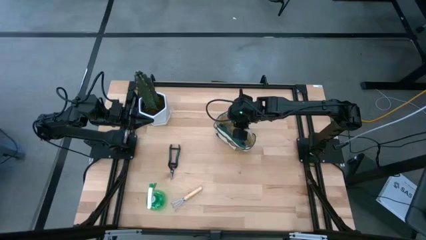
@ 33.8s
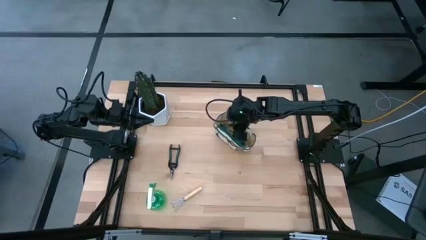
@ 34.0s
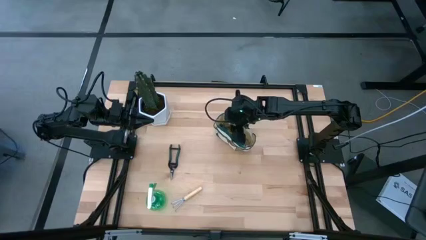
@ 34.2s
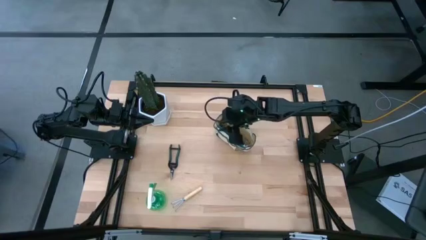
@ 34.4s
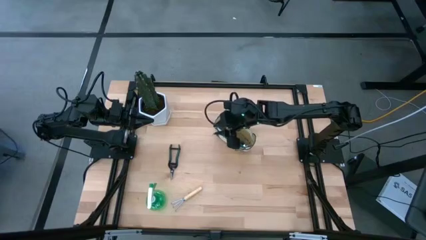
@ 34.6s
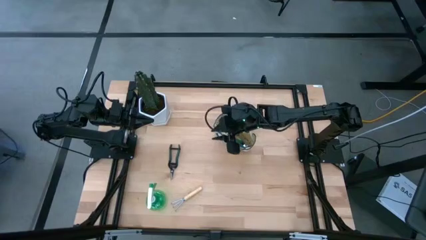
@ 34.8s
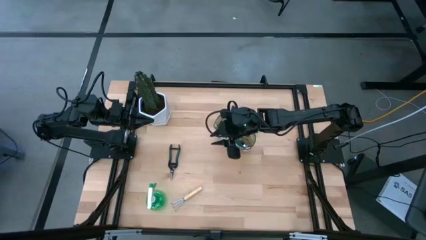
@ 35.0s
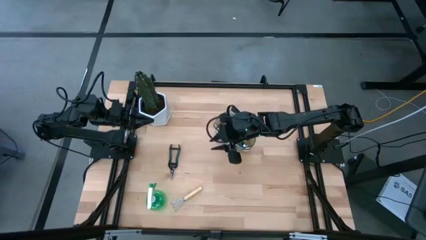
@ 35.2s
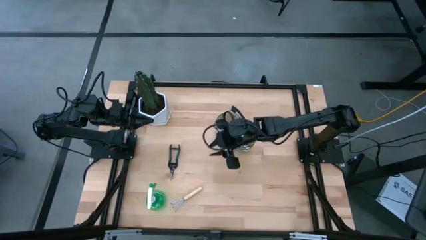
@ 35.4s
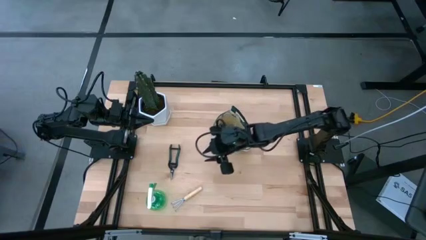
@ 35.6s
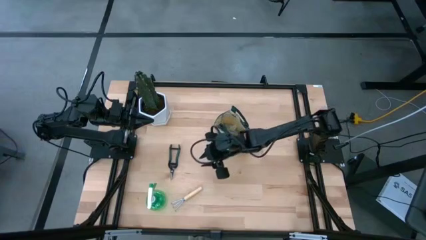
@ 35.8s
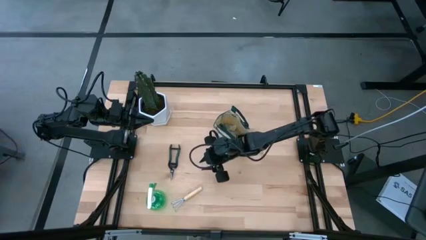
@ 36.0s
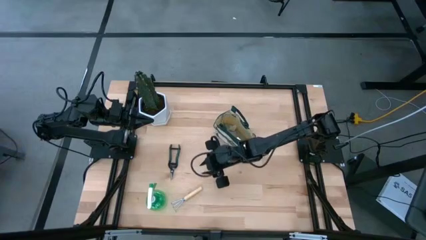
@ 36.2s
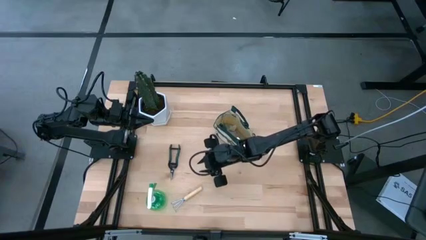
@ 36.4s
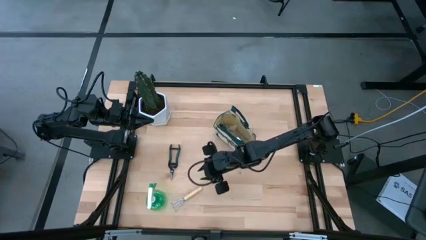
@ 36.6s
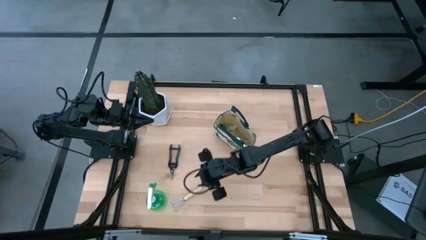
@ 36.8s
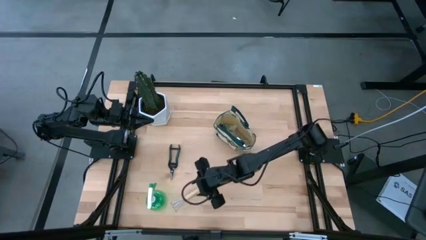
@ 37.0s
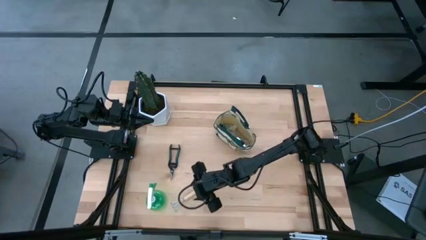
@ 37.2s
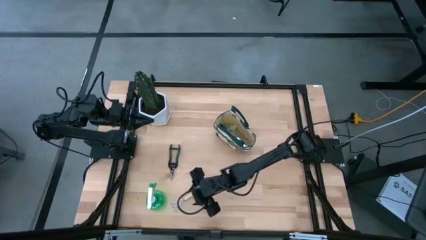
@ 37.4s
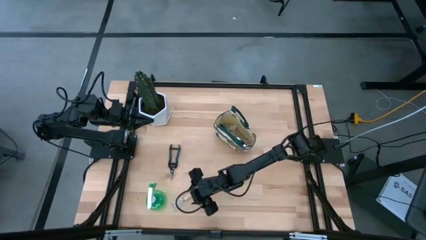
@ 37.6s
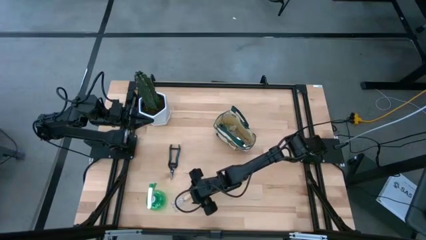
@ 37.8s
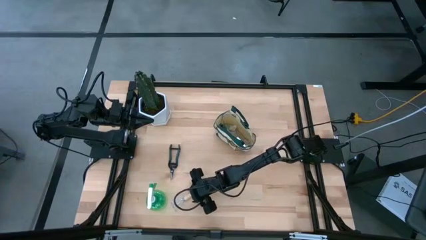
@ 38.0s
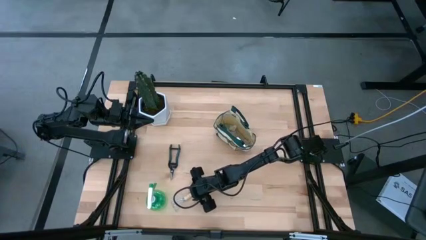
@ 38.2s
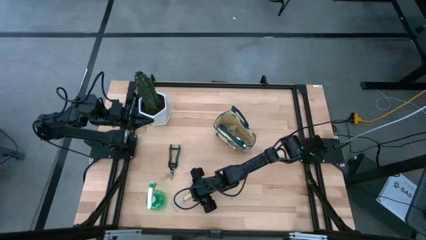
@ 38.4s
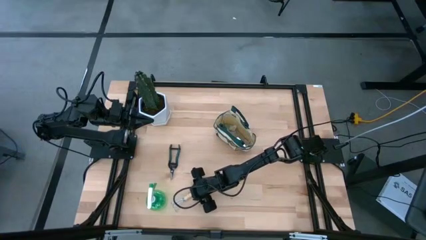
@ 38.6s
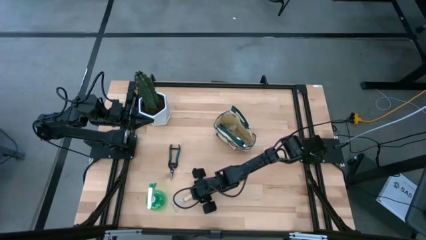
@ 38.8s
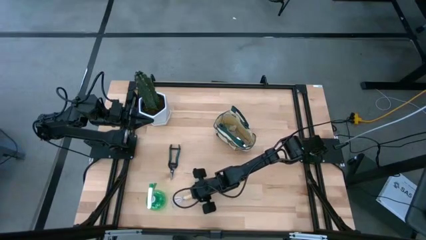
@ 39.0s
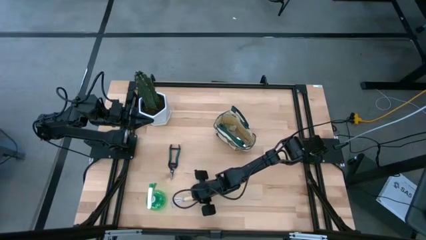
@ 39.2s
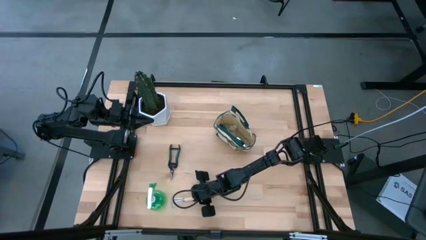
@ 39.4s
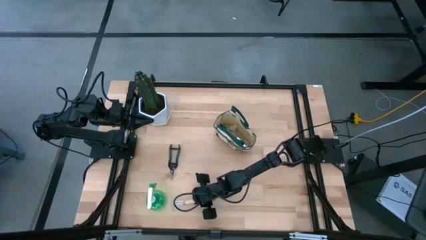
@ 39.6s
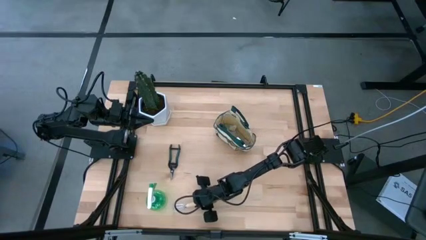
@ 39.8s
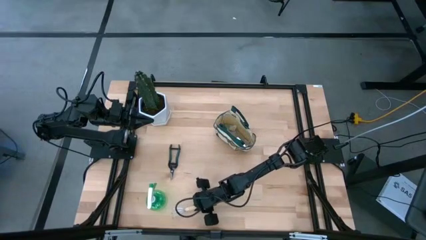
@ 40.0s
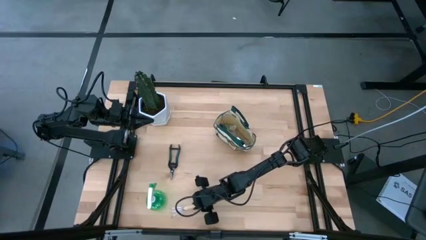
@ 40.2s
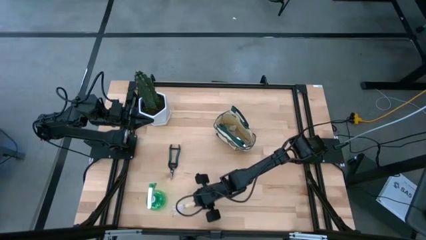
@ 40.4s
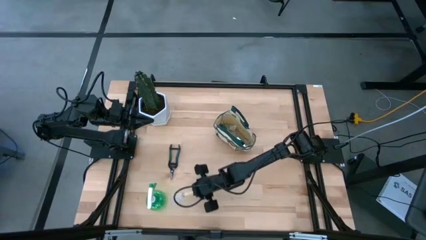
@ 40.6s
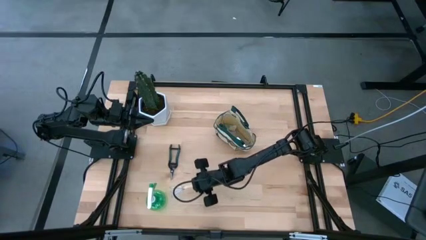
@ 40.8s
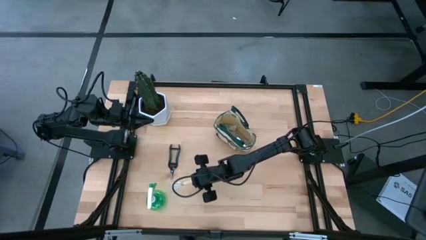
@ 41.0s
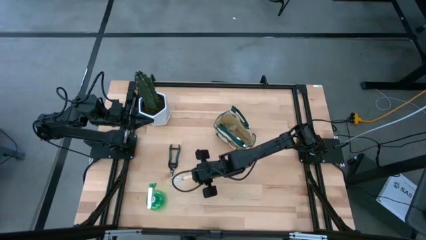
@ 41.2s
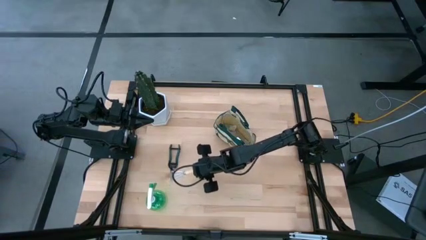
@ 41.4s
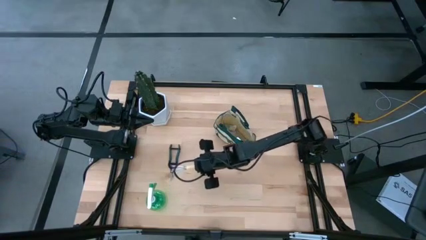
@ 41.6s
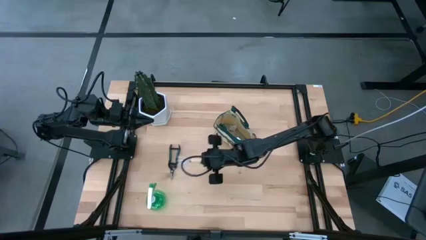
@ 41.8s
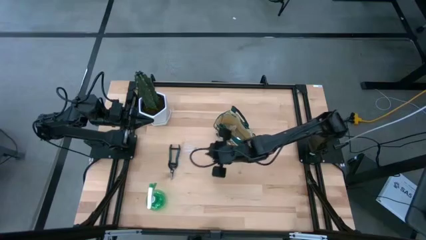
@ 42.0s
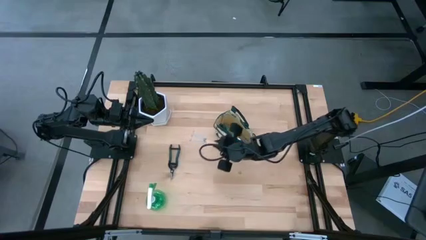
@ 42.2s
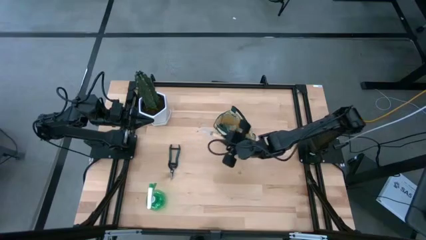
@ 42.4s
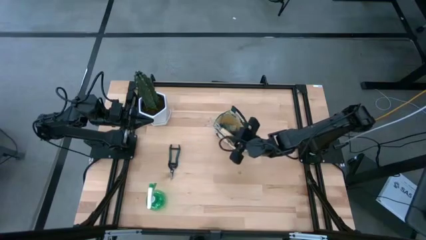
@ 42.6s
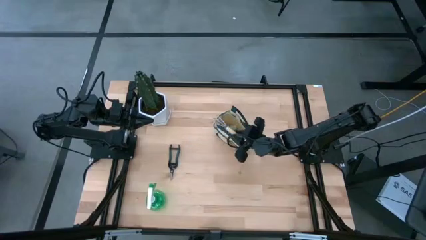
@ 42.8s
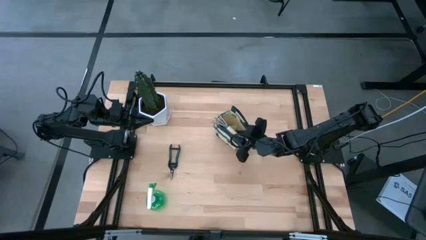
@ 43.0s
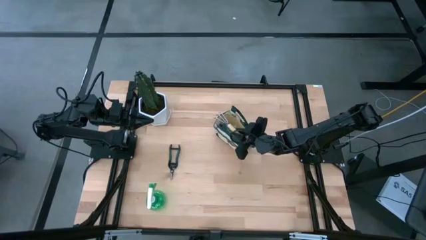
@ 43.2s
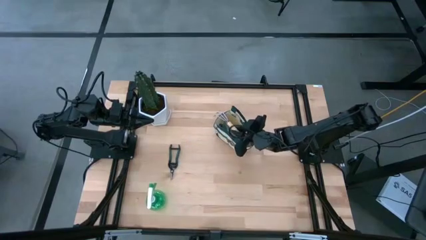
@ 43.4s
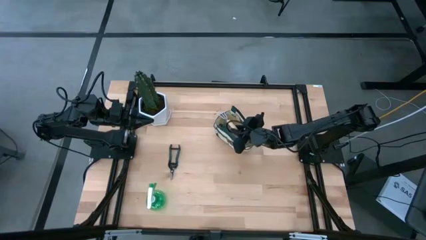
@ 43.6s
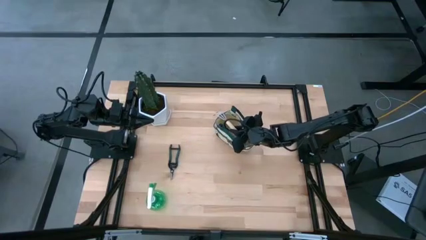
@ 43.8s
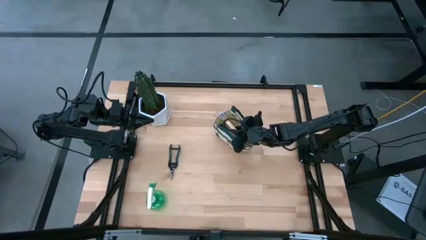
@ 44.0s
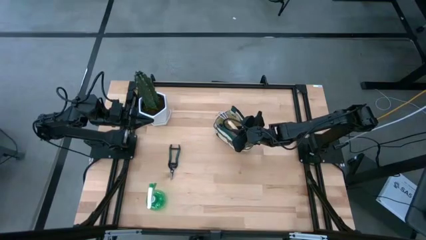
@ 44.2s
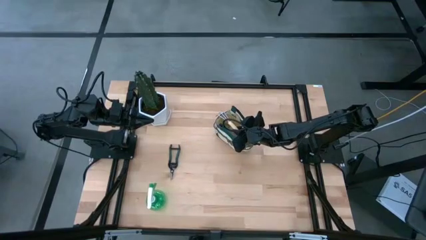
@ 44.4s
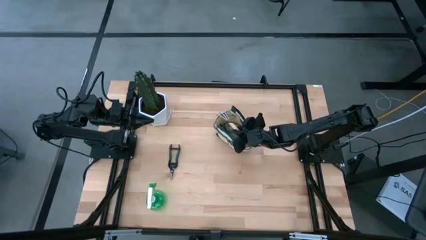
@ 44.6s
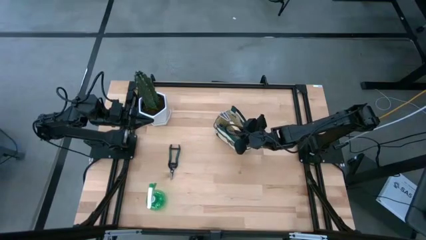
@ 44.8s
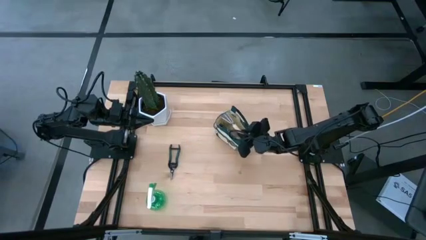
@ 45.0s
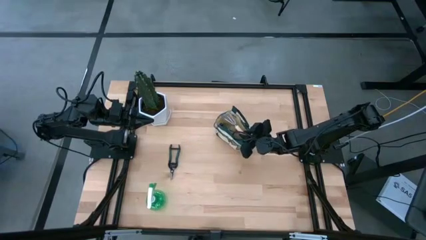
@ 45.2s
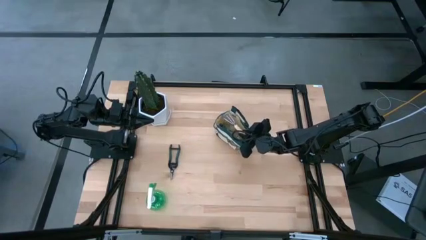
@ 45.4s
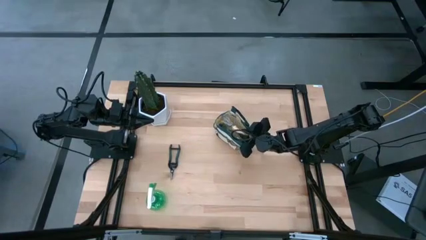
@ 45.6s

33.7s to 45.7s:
Task: Pick & Place Garden tools in Gardening bag
Put the brown hand rake into the gardening bag

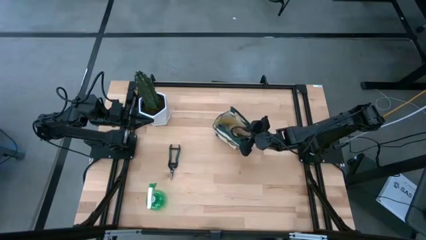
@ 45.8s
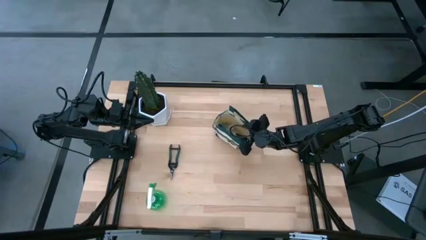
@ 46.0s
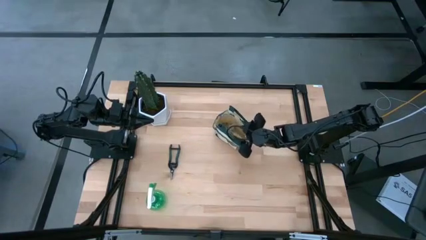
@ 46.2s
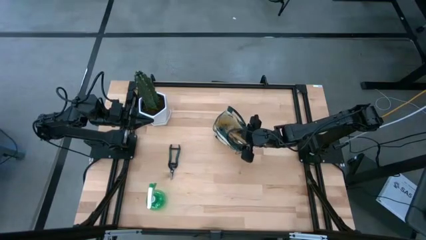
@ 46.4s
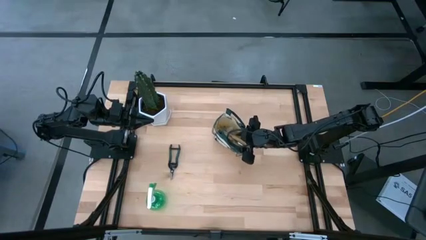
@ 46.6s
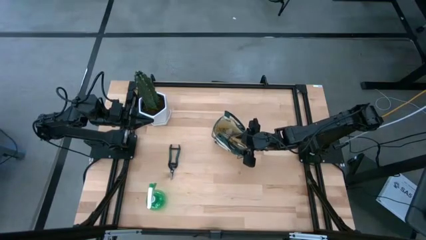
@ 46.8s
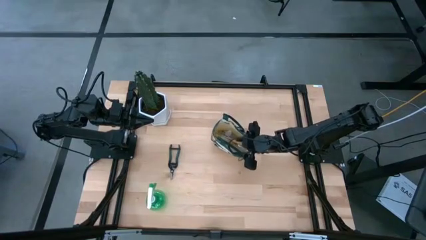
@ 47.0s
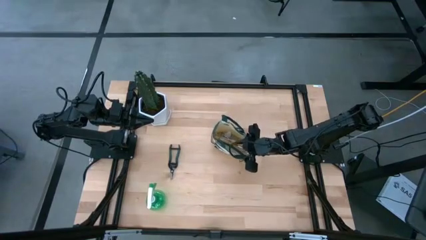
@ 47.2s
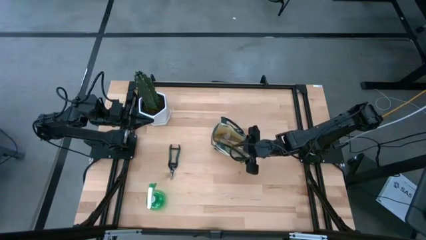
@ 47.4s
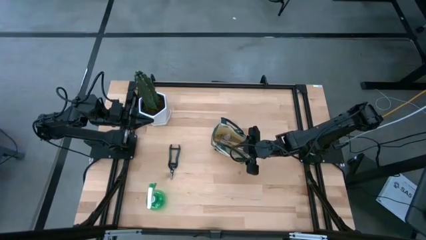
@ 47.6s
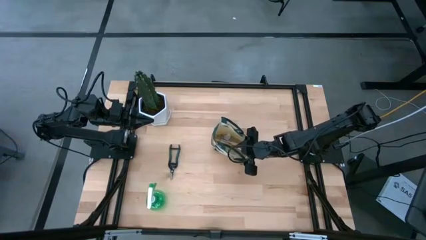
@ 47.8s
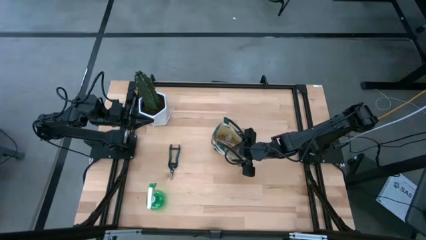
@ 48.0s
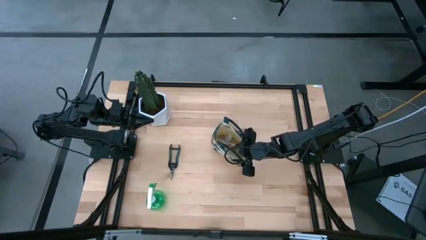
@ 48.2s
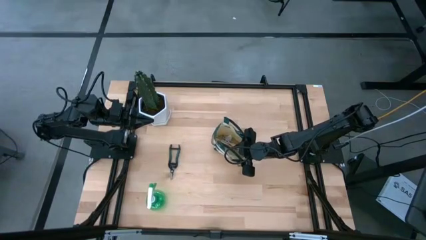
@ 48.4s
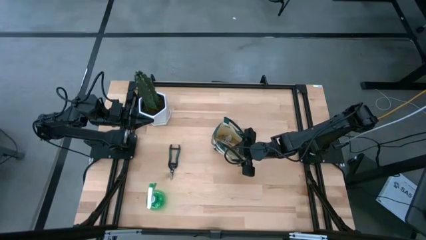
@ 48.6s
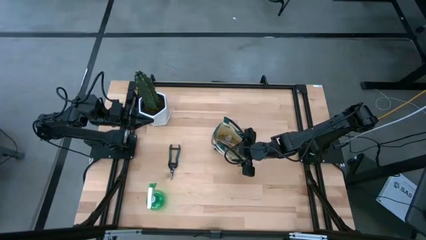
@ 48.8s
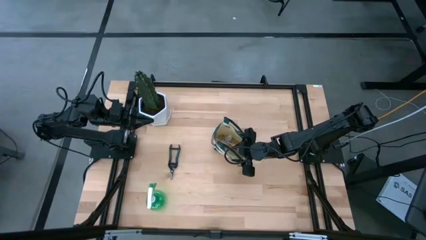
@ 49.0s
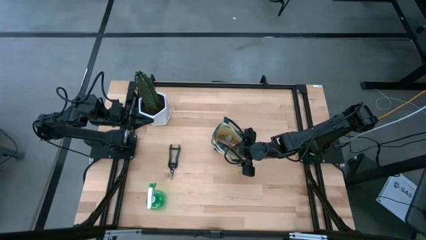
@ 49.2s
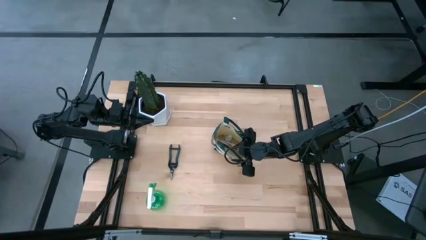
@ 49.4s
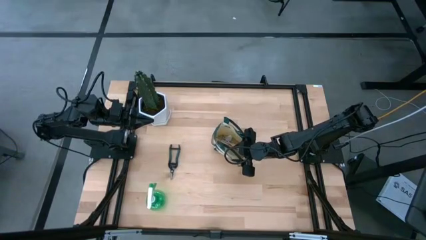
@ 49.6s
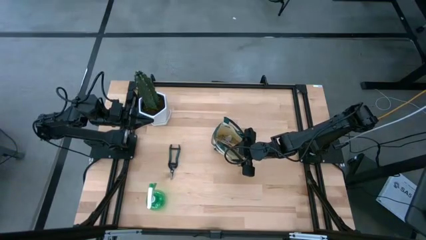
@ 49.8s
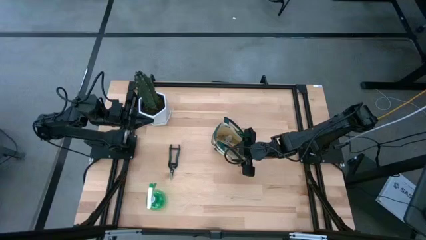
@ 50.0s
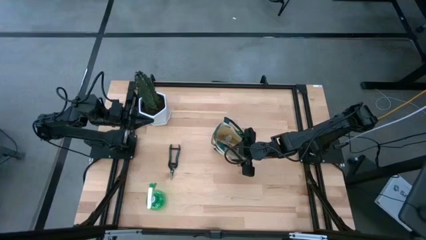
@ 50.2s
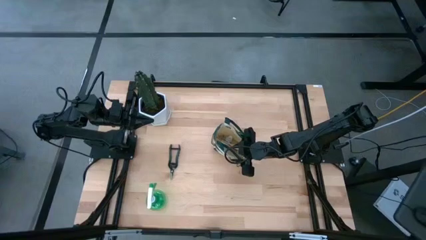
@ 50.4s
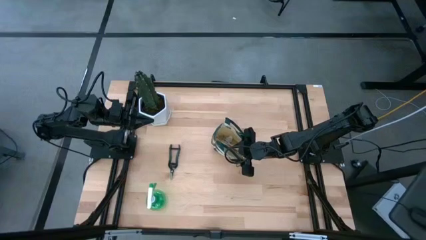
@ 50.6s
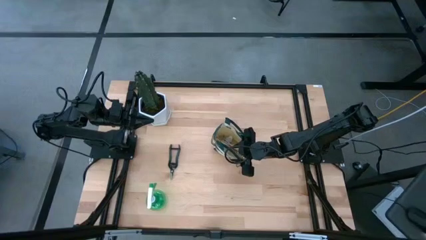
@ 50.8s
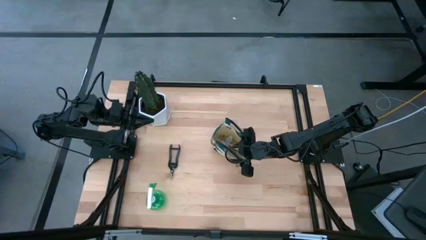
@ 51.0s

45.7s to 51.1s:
Adjust the gardening bag
